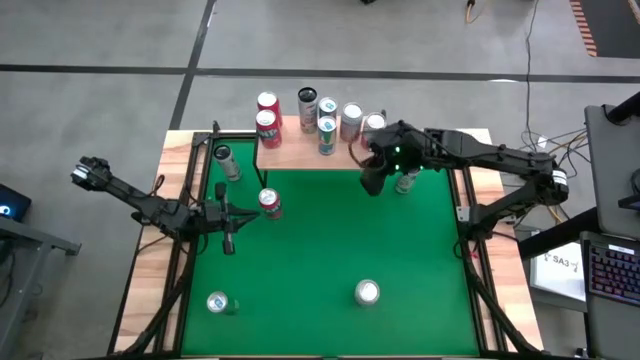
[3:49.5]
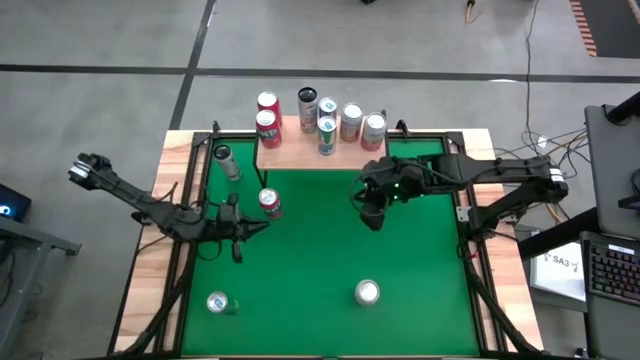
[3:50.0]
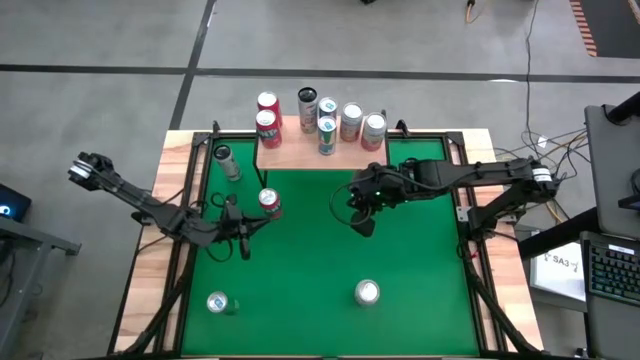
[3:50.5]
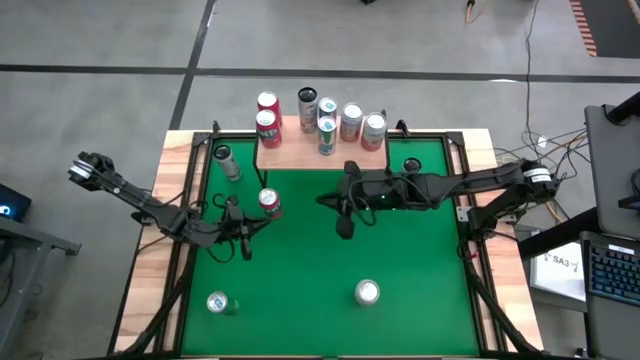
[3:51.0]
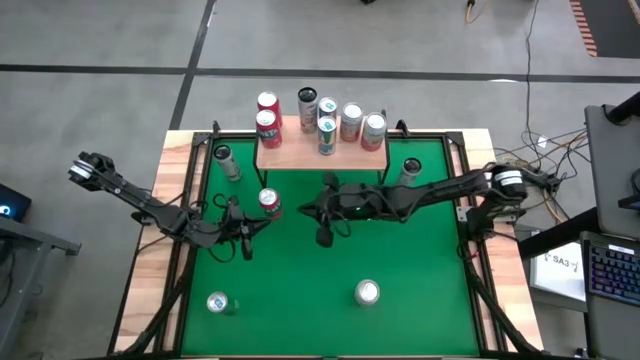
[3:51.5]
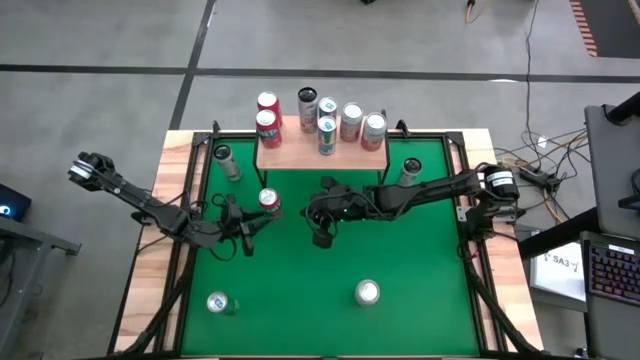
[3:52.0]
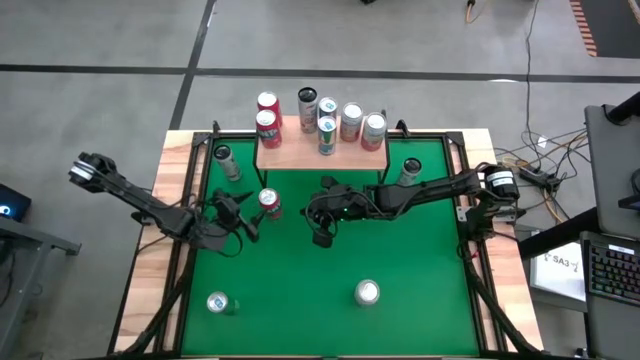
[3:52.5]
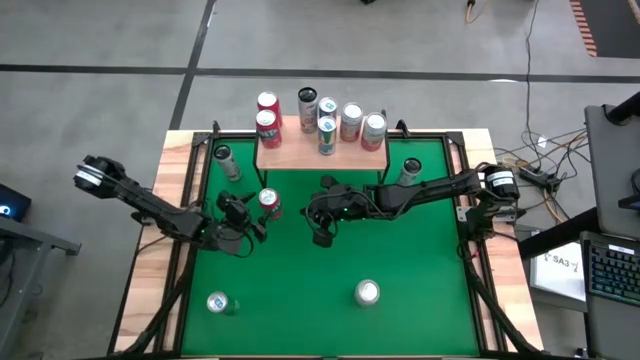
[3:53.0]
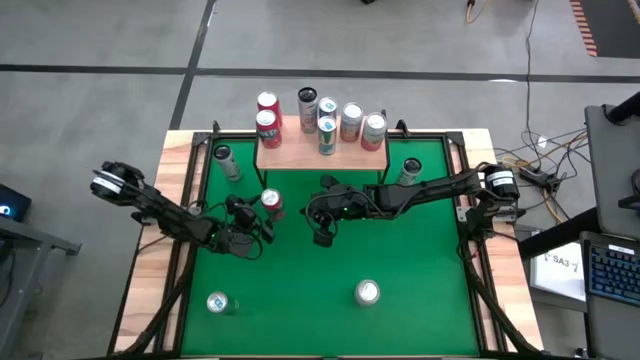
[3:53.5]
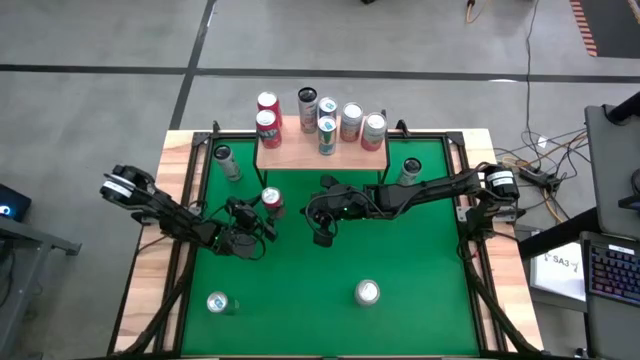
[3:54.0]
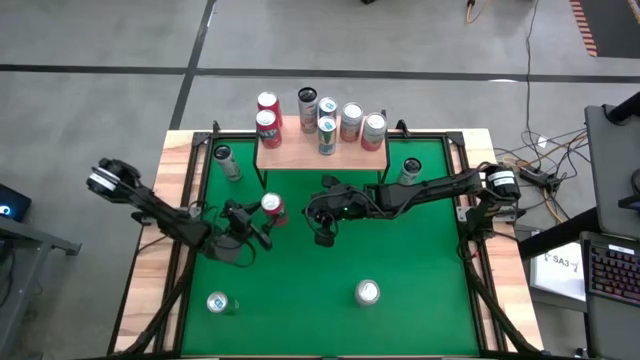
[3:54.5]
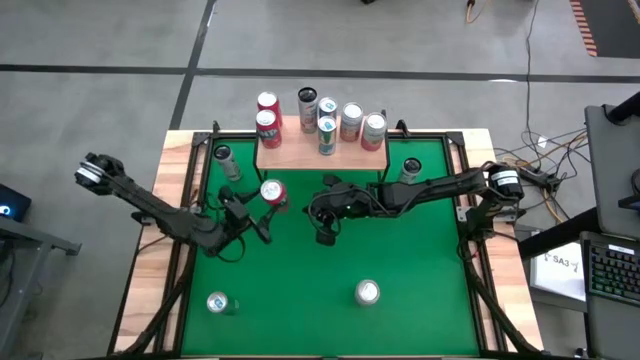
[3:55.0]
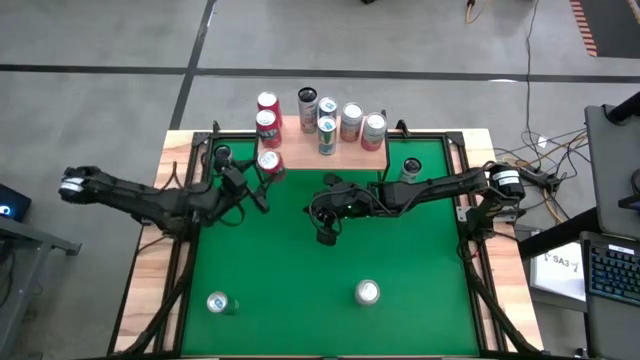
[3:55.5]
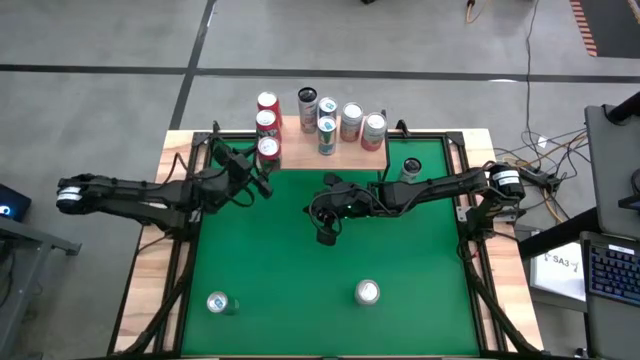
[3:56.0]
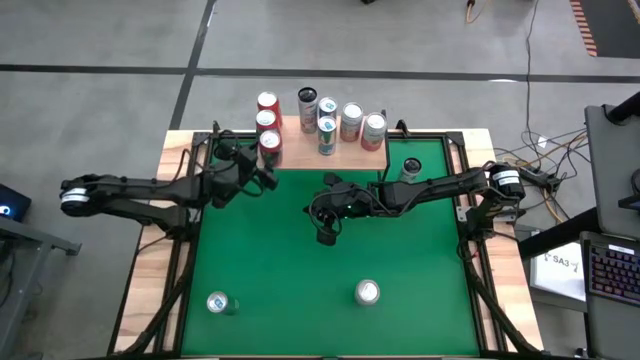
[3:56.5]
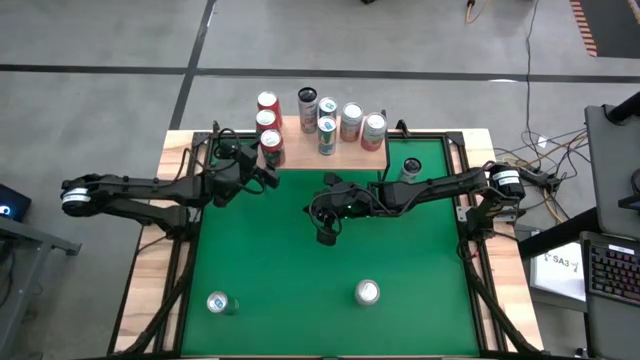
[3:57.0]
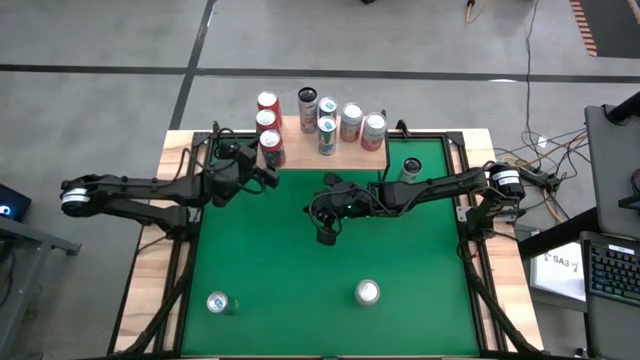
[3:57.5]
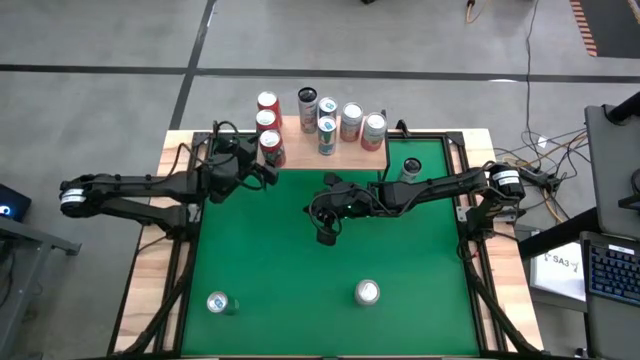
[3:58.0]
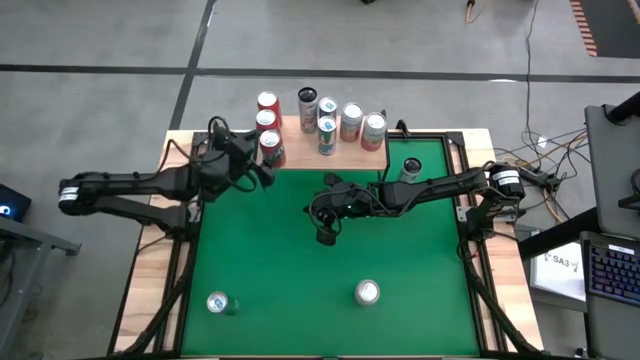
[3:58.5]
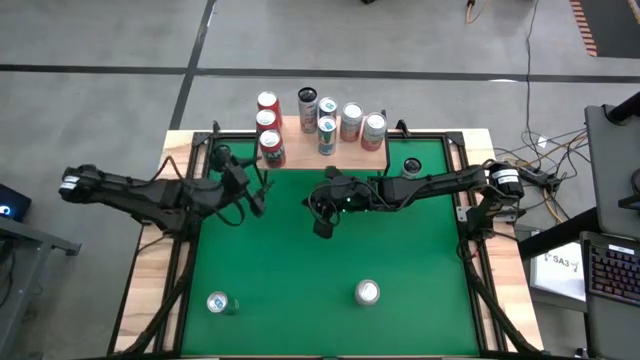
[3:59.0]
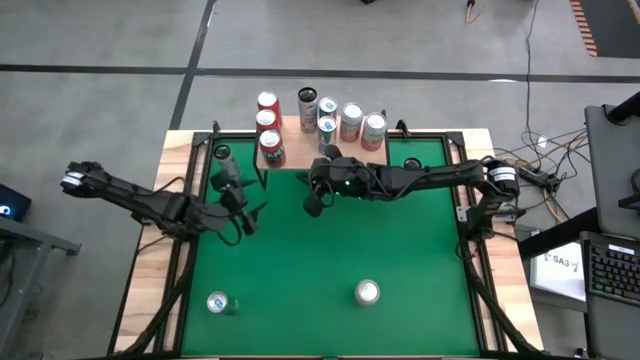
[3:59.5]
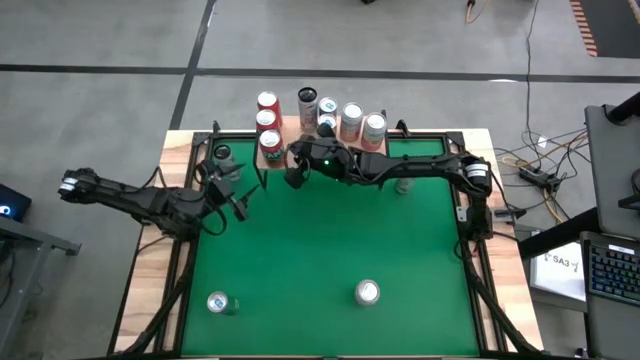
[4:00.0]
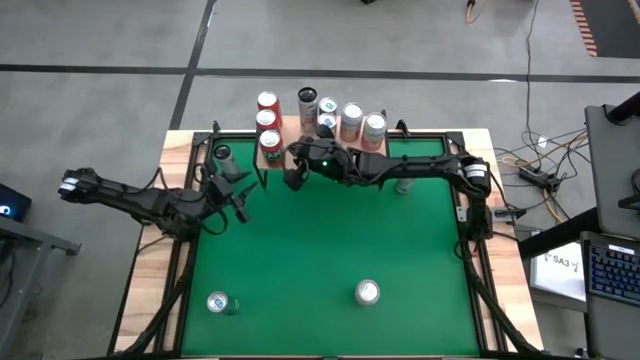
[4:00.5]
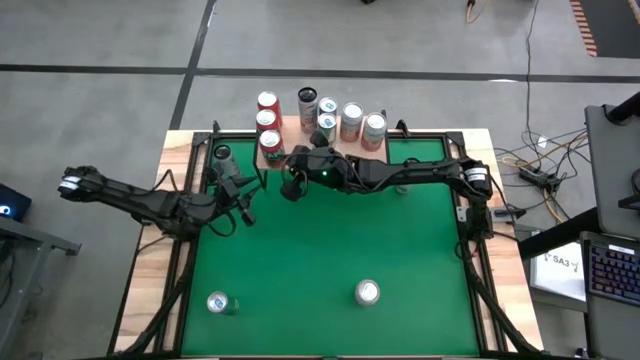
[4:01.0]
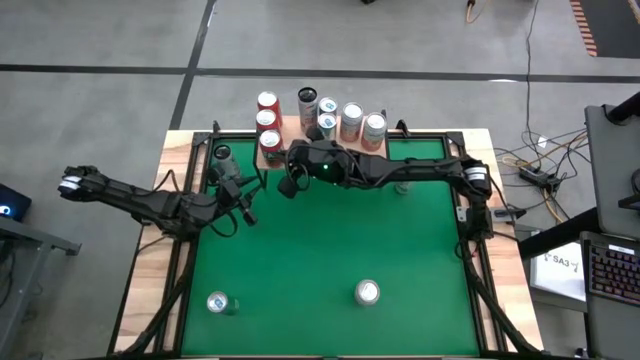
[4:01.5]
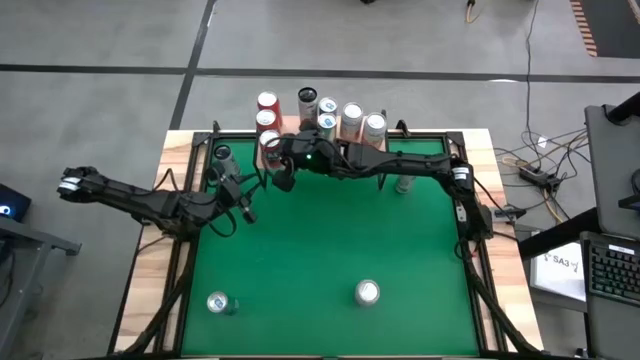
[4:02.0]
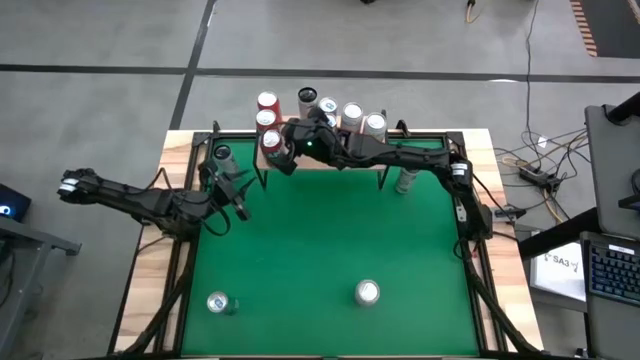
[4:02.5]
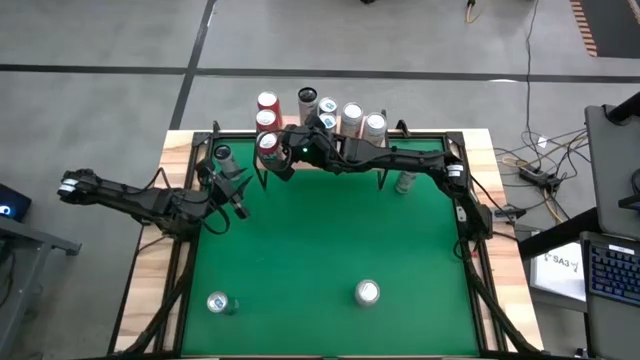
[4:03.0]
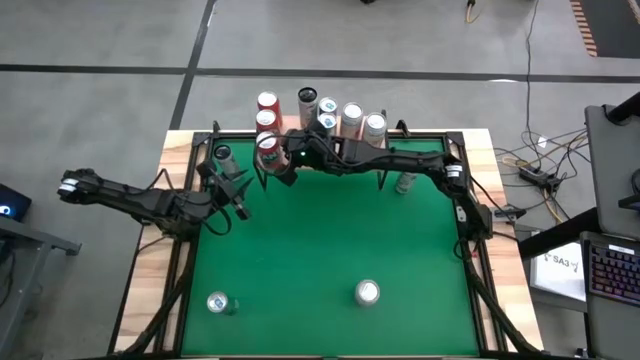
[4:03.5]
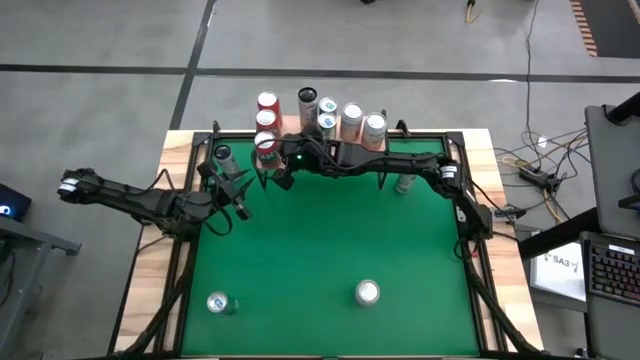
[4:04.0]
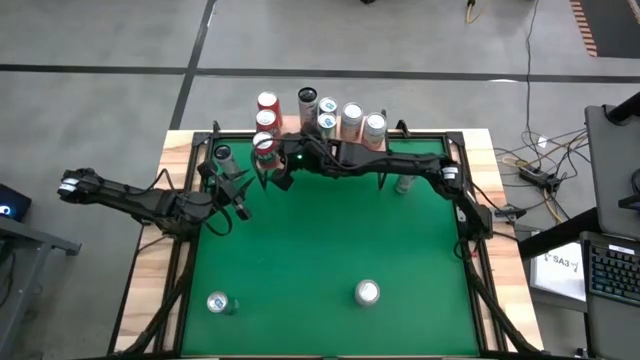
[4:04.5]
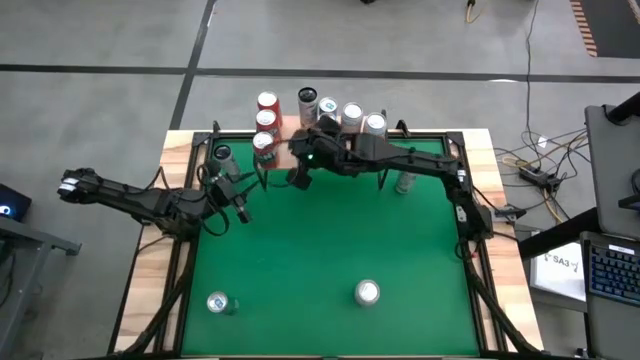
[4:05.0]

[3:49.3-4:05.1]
Task: Place canned beverage on shelf
Put the orange soda can on the shelf aligned with other orange soda cans

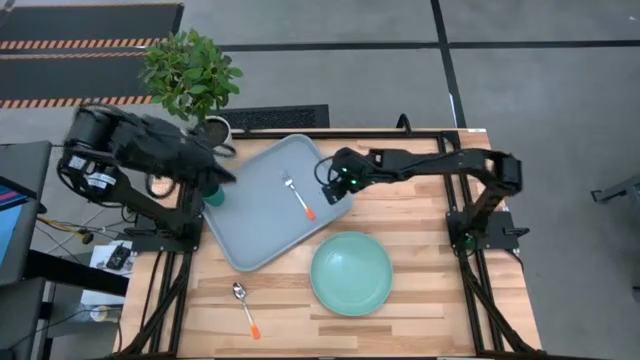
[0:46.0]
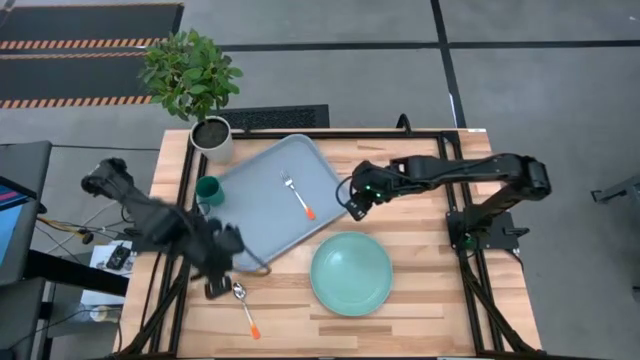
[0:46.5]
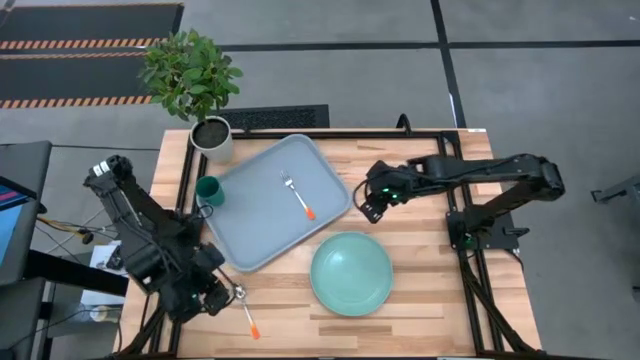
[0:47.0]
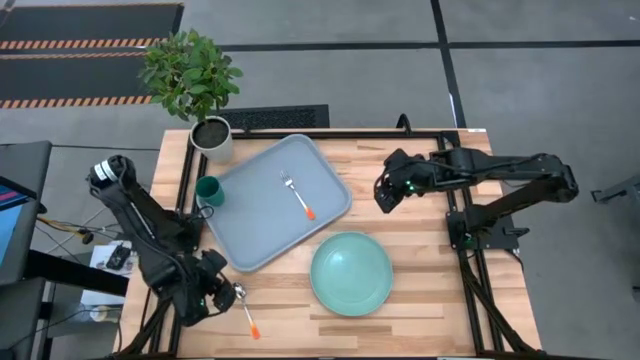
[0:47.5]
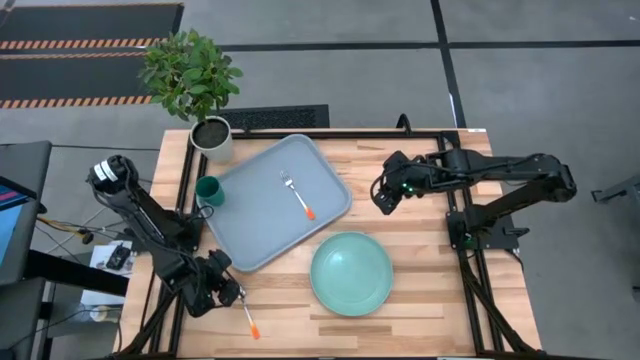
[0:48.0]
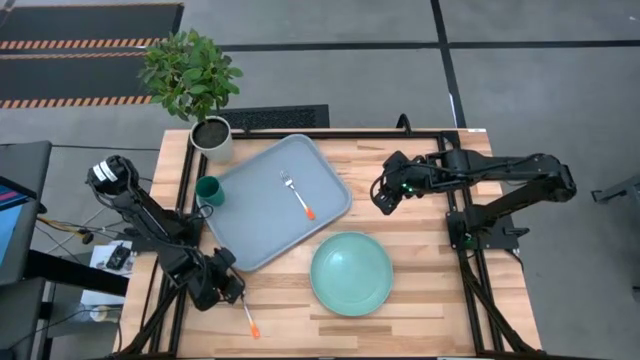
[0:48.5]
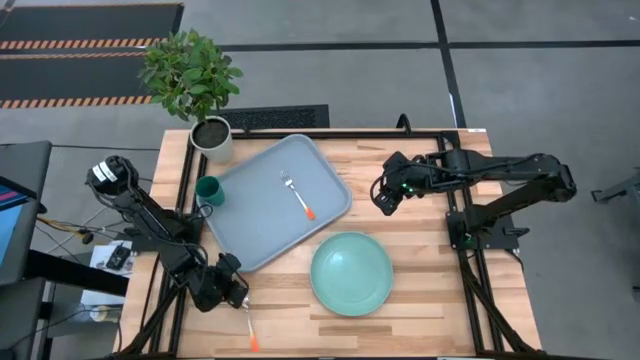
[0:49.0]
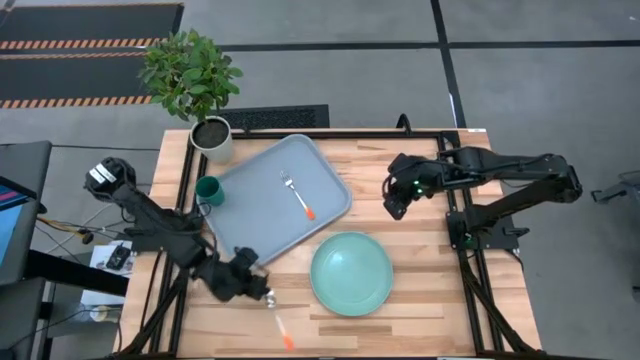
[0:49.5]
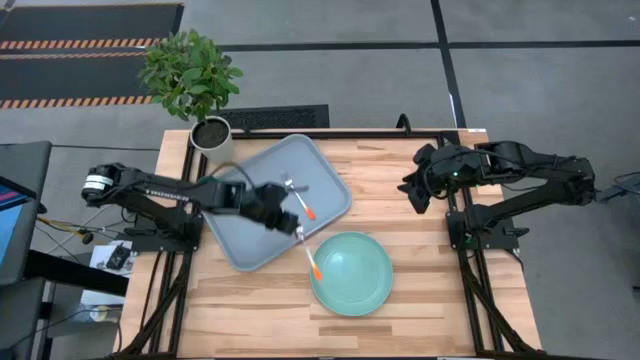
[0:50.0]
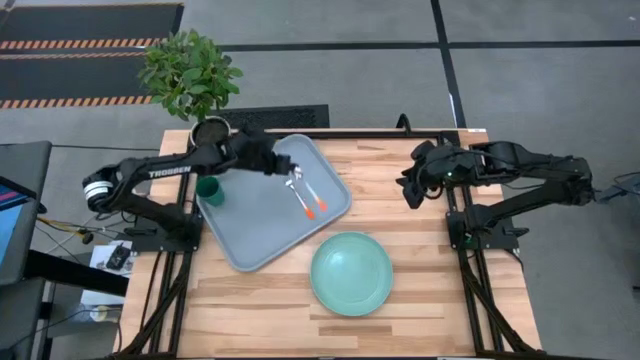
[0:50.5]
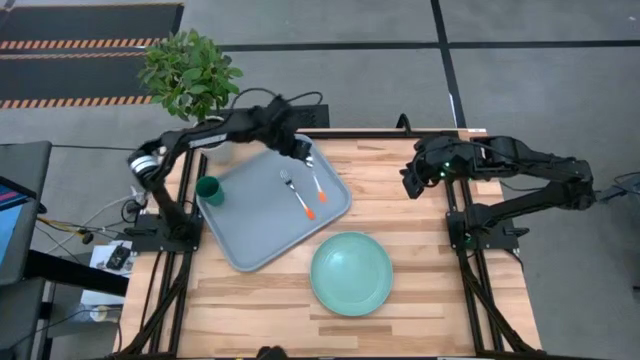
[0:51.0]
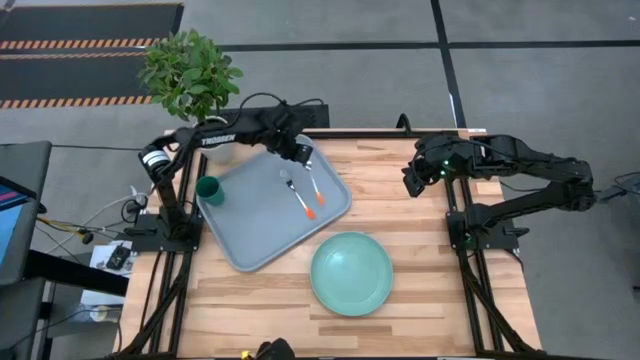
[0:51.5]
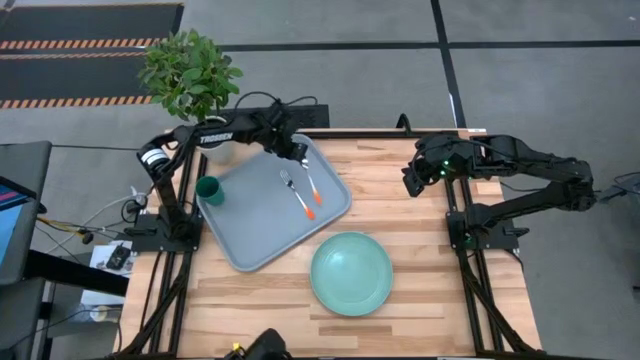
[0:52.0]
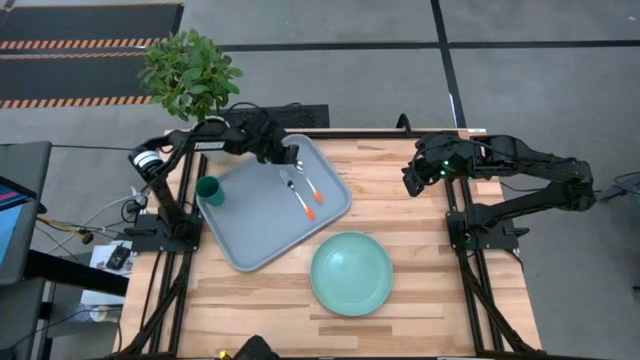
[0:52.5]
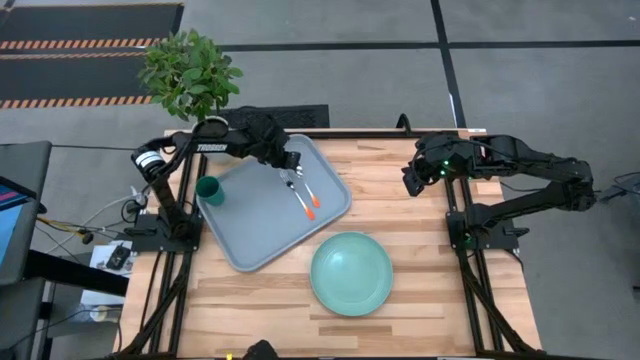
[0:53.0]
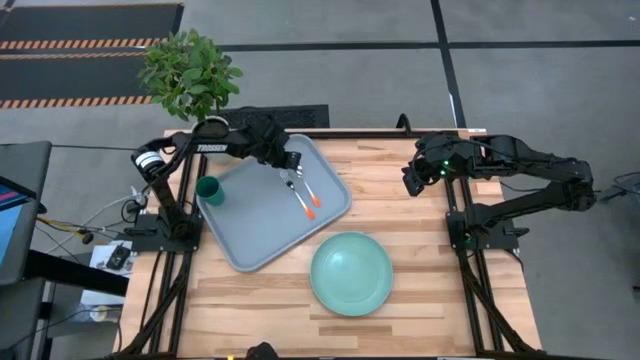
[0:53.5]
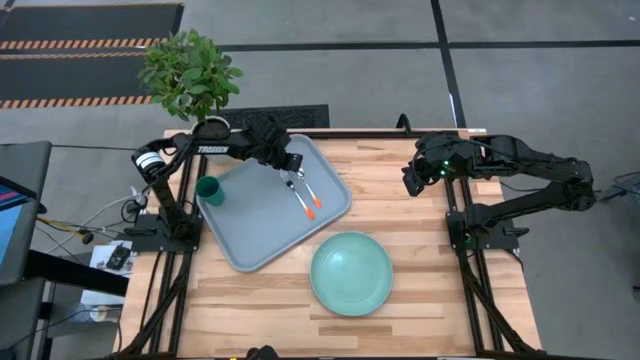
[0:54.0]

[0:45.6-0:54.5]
Task: Pick and place plate/cup/fork/spoon on tray
Put the orange spoon on the gray serving tray
